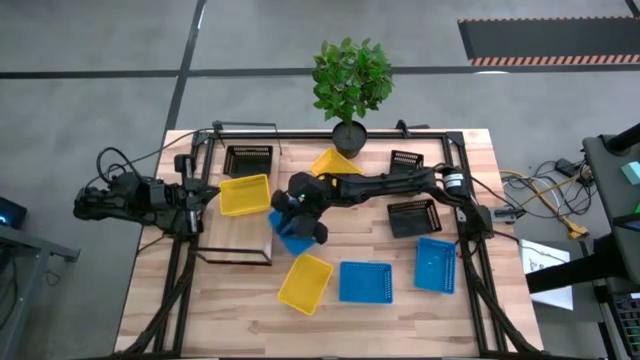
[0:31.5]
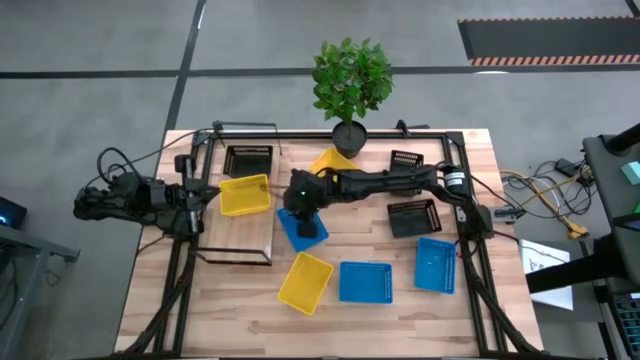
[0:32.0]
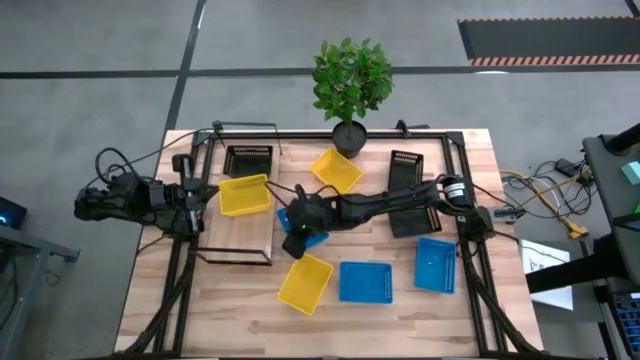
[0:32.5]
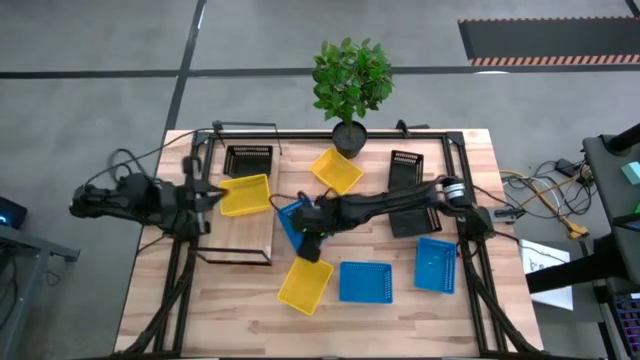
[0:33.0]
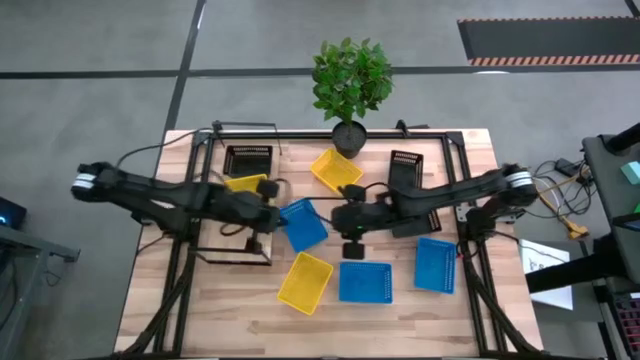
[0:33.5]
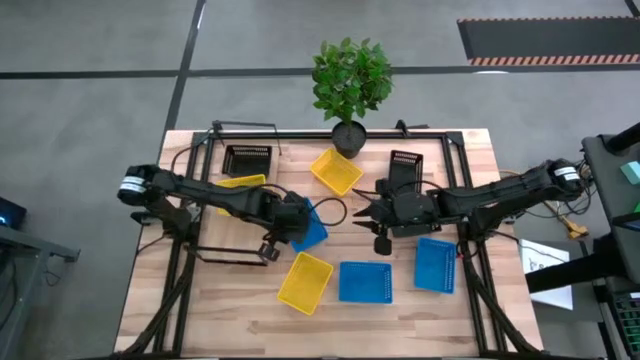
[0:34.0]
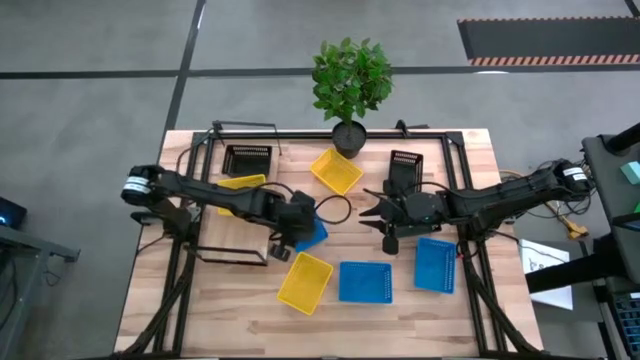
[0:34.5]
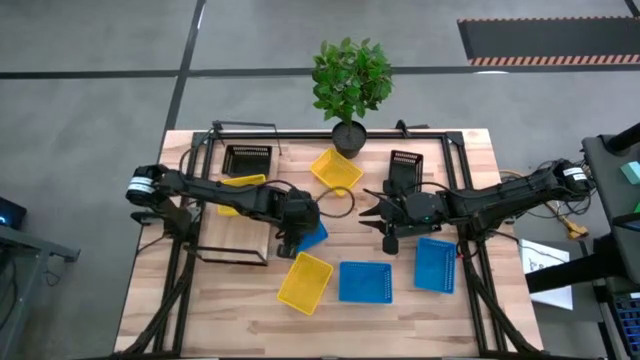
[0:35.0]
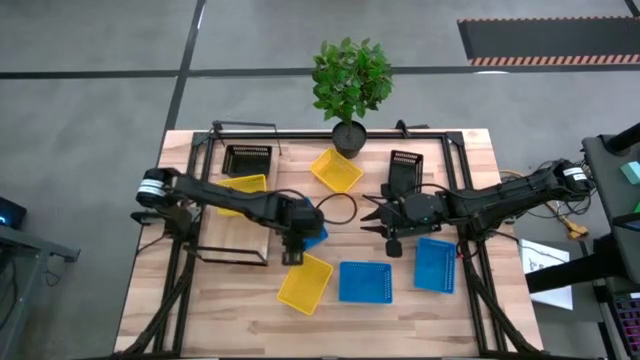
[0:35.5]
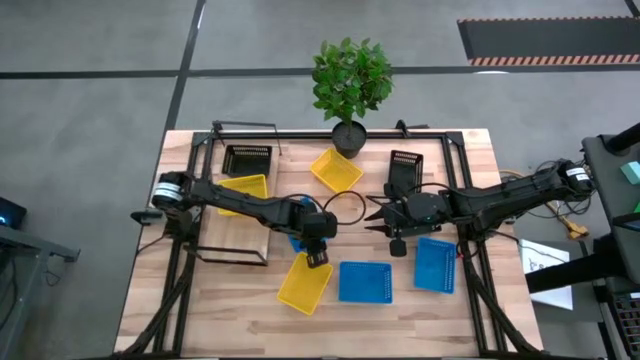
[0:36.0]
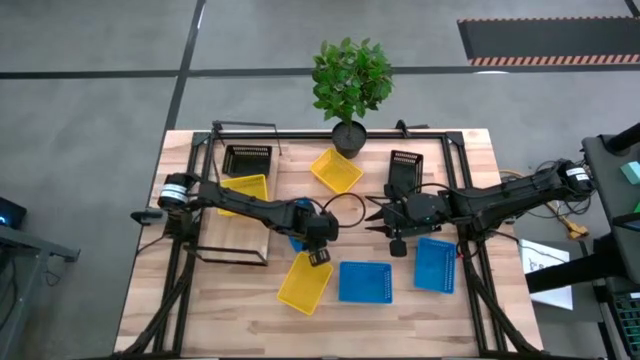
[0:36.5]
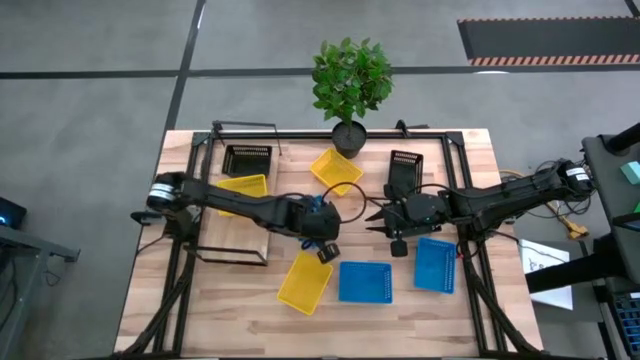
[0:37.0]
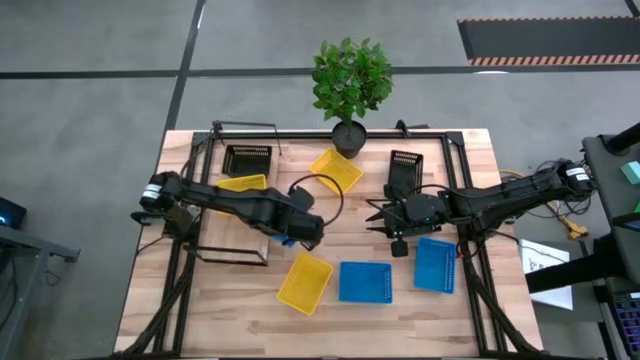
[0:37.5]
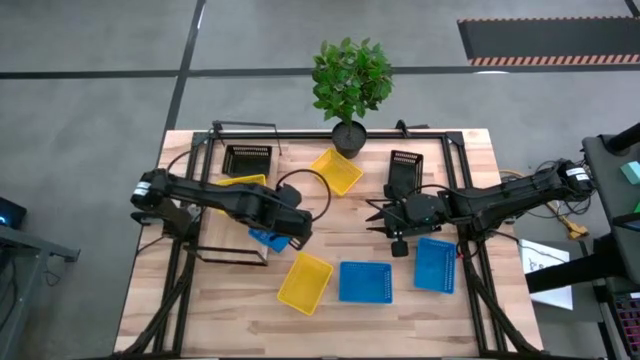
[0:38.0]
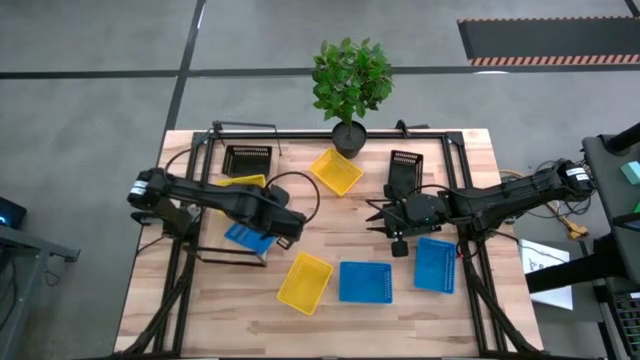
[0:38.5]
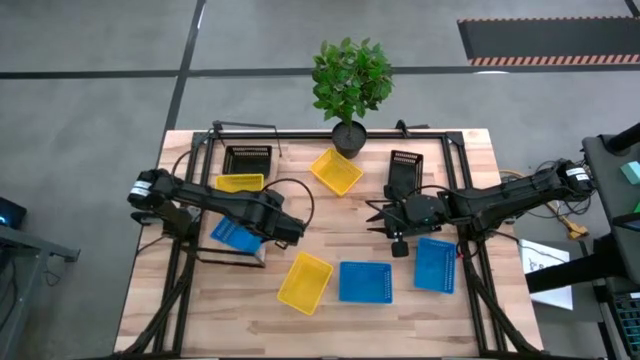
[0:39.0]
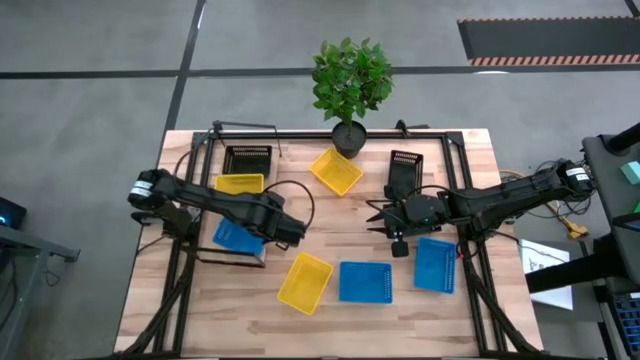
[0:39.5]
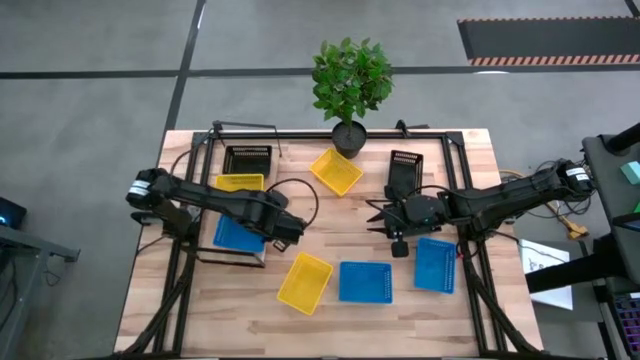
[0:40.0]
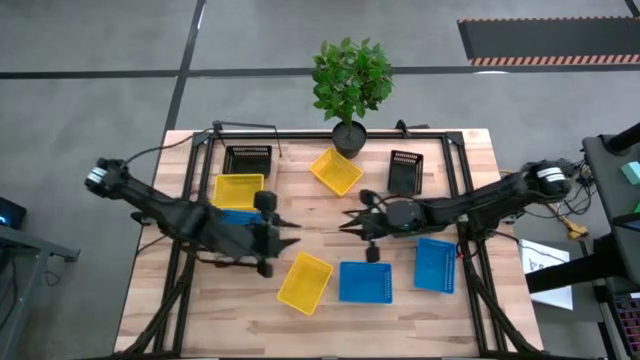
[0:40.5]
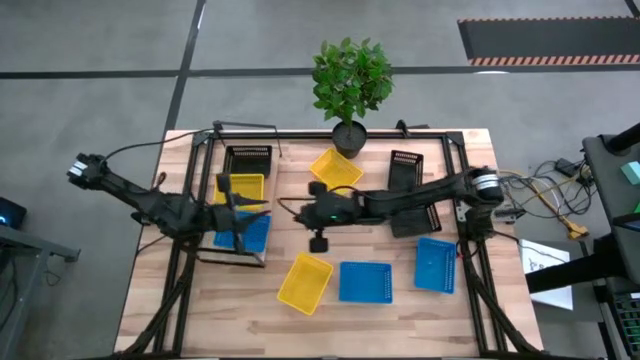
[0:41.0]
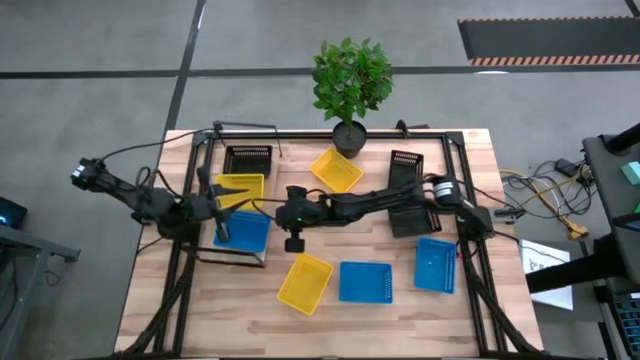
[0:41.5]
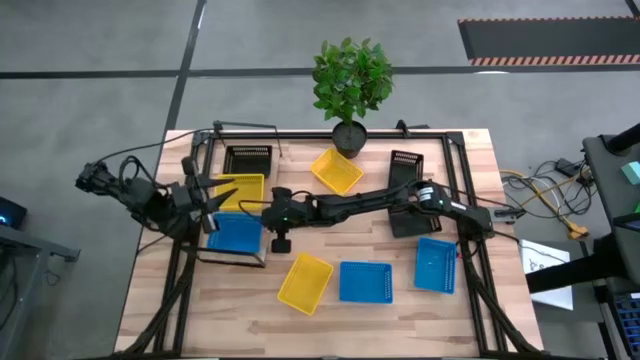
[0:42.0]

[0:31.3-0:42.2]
Put the top blue basket on the shelf

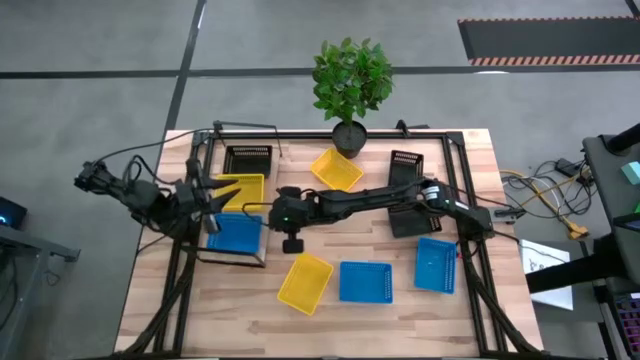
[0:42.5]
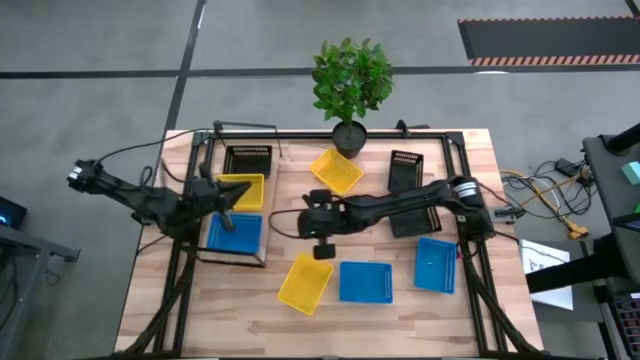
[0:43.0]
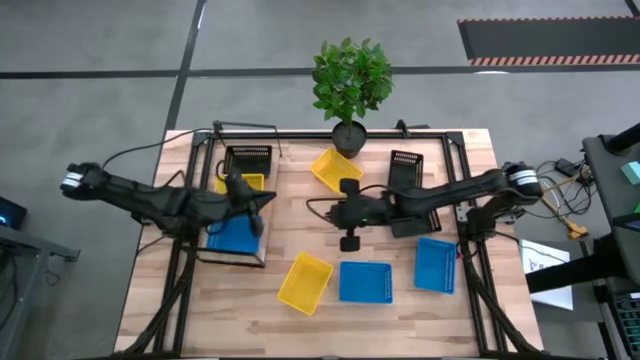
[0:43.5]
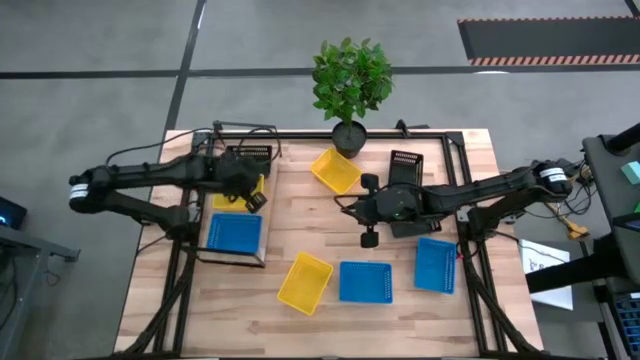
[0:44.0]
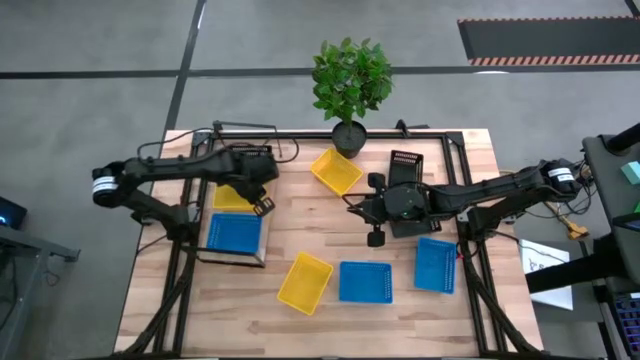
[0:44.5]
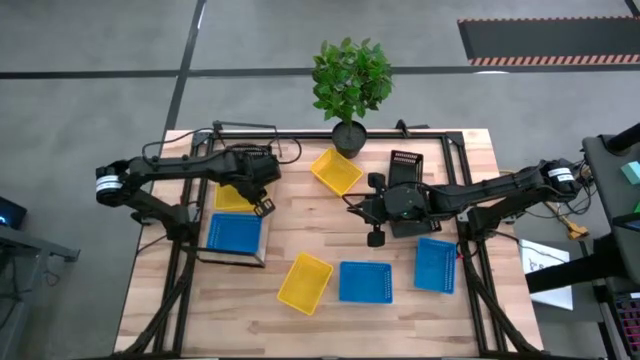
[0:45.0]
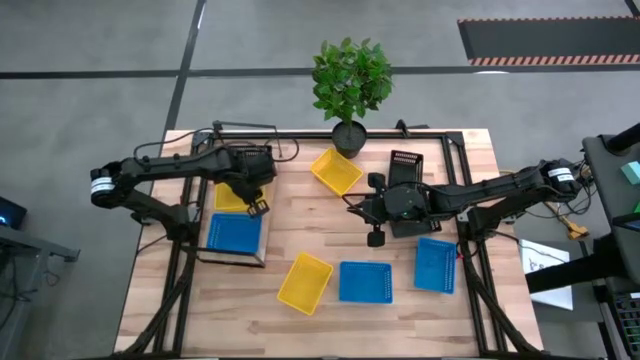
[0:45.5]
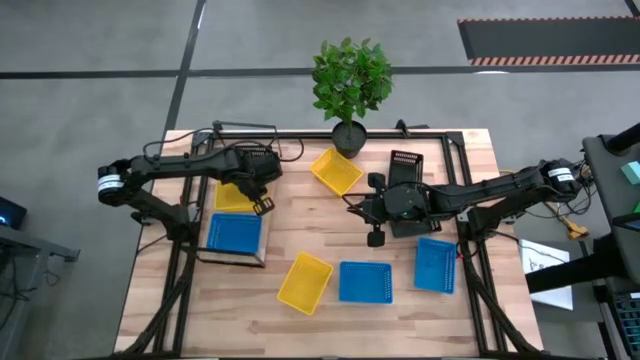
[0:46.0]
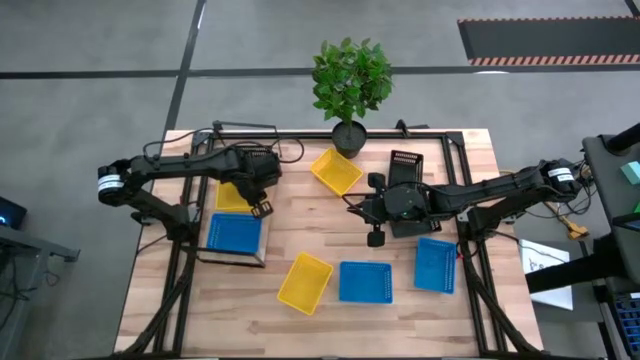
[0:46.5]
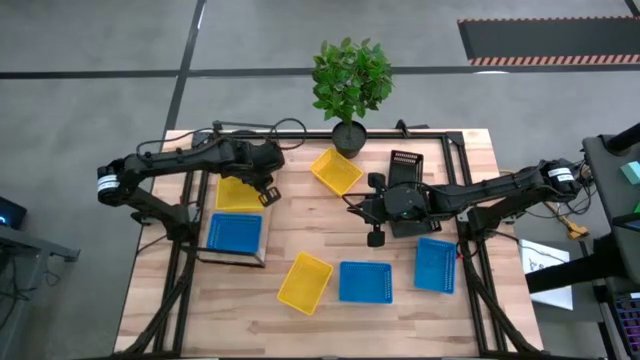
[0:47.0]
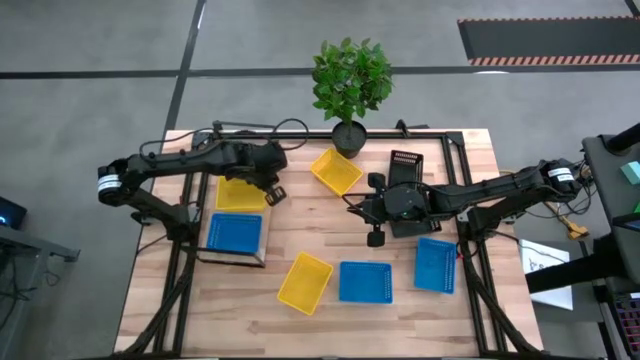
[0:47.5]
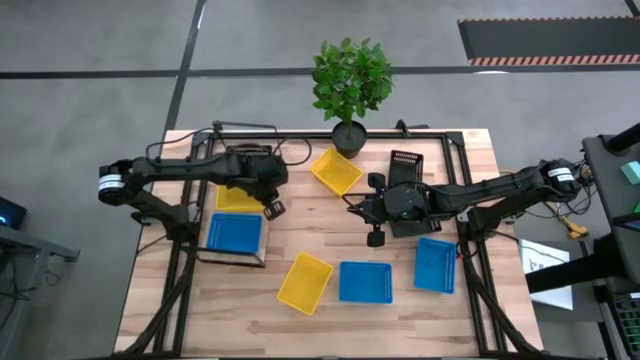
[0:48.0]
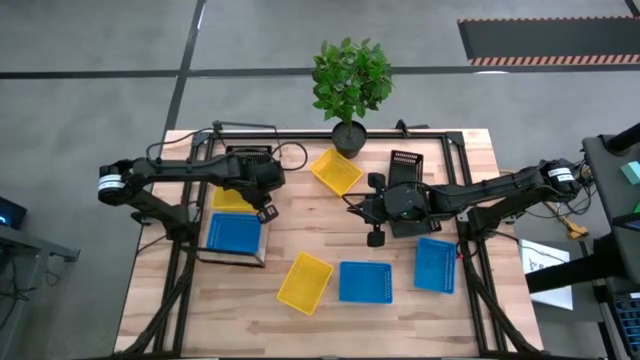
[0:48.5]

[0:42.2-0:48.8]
Adjust the yellow basket on the shelf

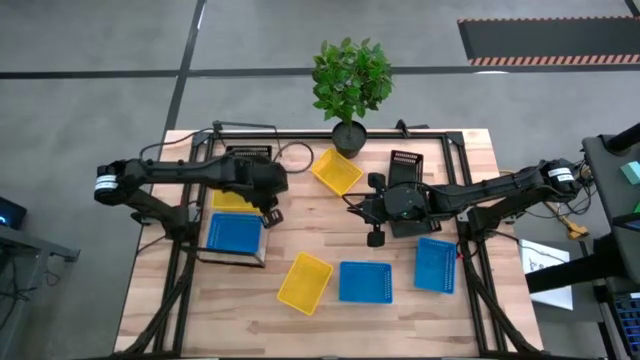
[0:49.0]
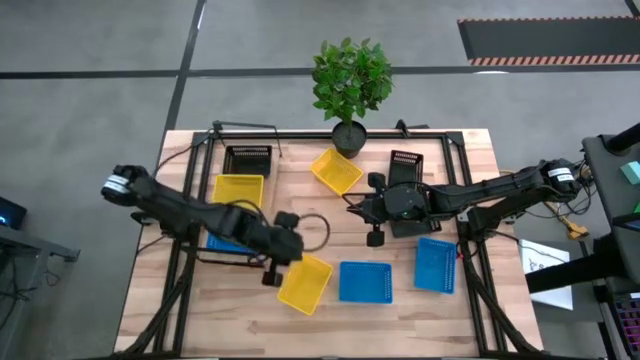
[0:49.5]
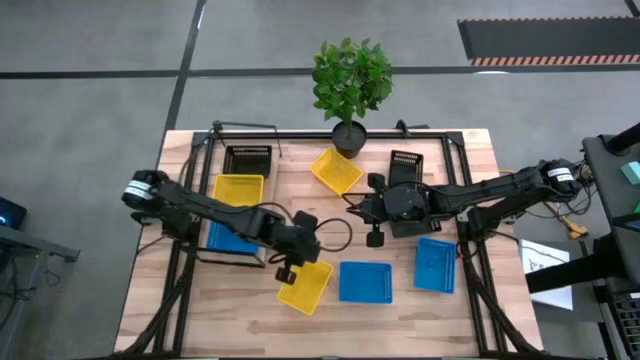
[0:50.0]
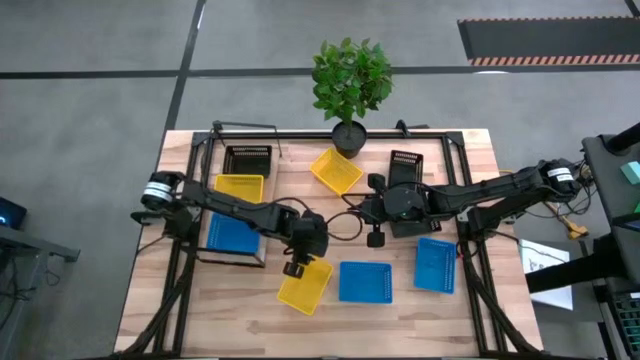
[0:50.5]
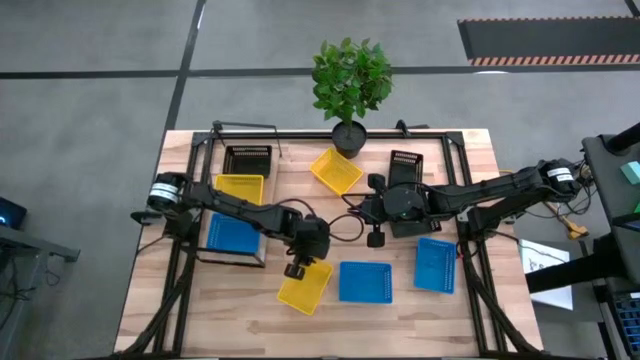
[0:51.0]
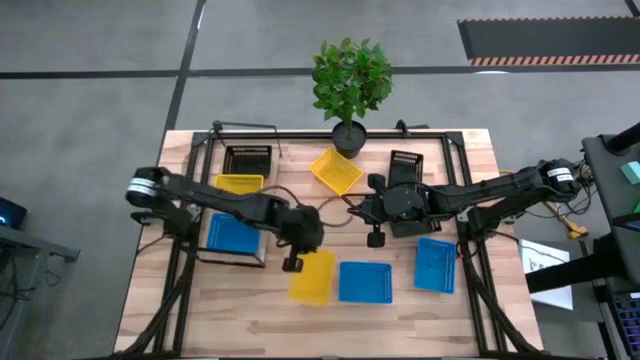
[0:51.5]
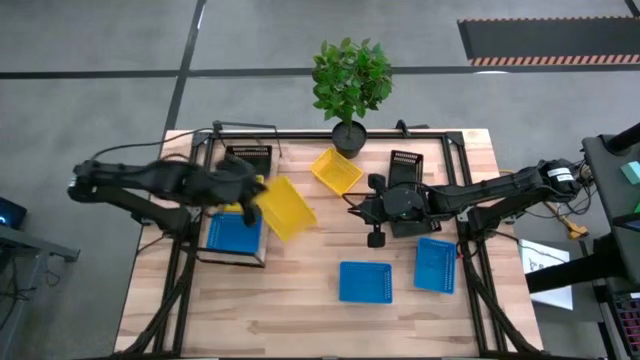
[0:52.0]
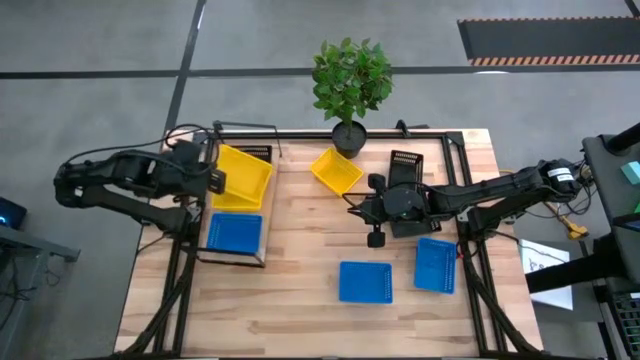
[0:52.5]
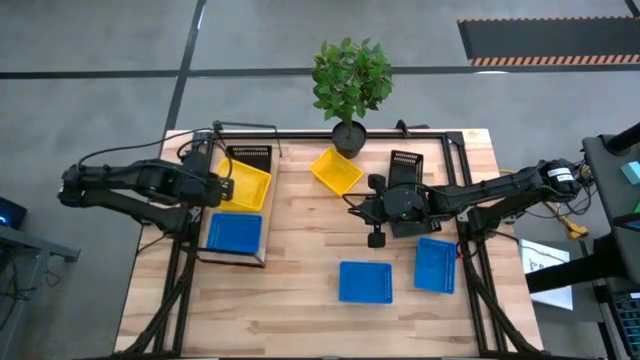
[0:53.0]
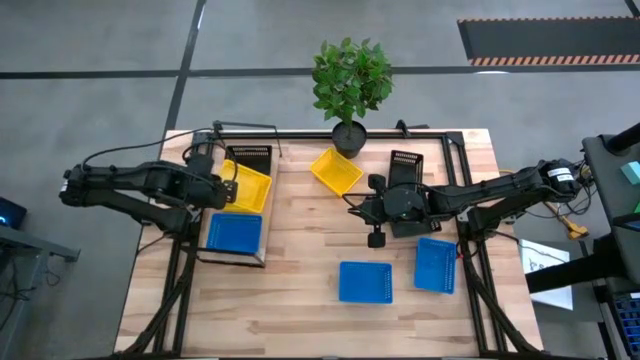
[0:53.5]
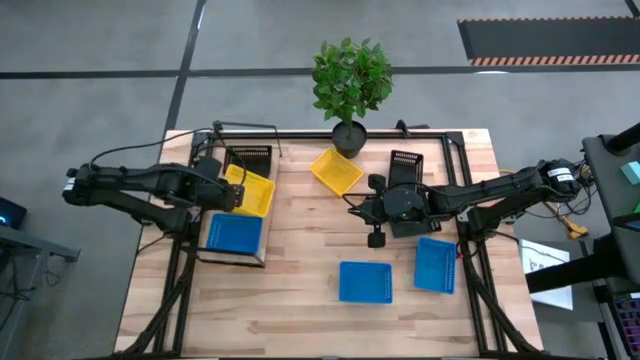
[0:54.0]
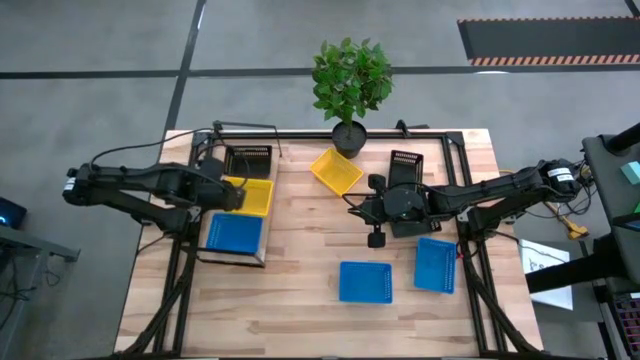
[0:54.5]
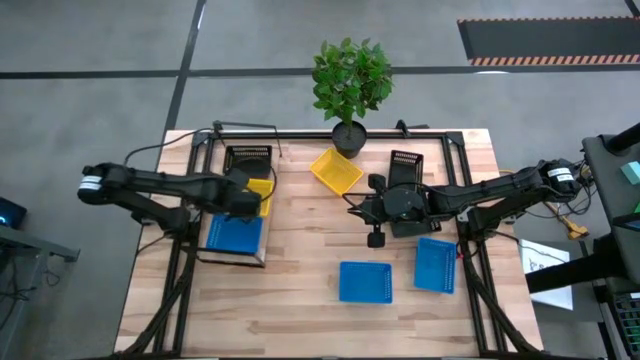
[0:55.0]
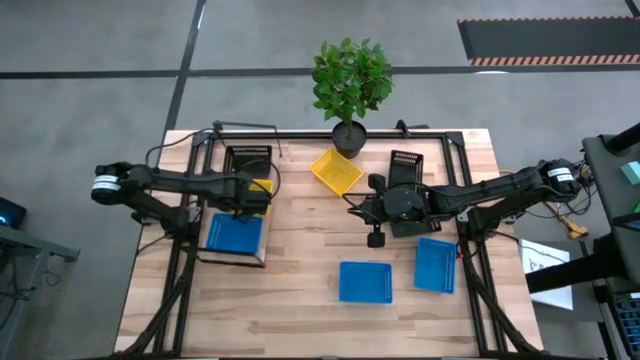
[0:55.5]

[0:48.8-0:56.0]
Stack the bottom yellow basket on top of the yellow basket on the shelf
